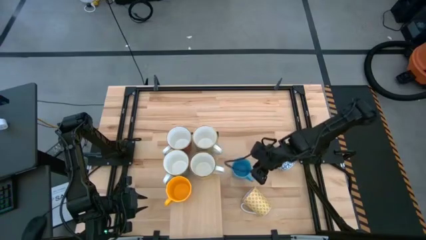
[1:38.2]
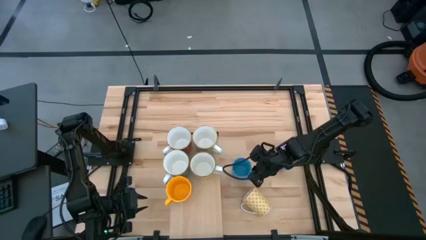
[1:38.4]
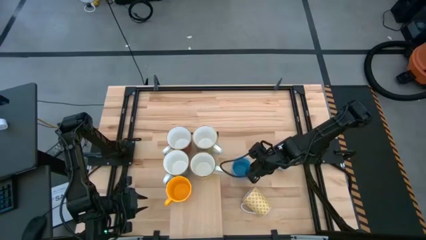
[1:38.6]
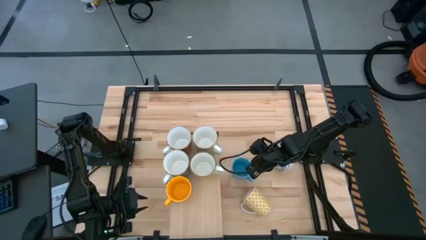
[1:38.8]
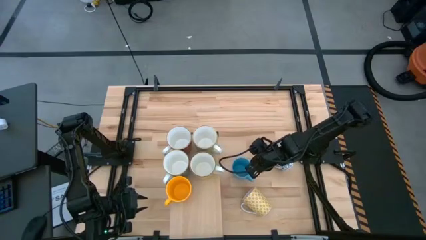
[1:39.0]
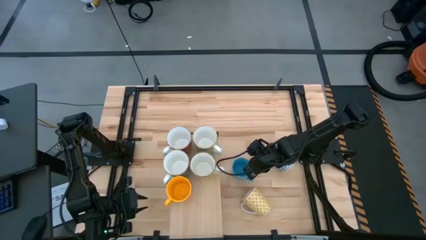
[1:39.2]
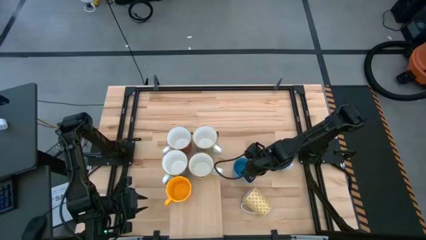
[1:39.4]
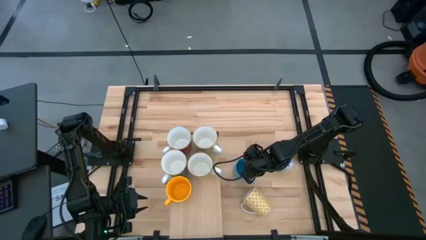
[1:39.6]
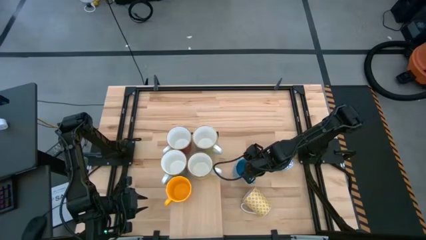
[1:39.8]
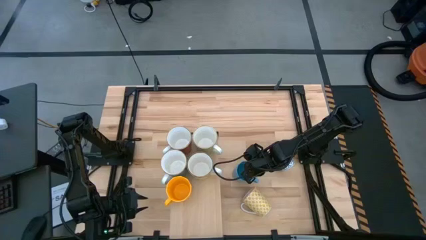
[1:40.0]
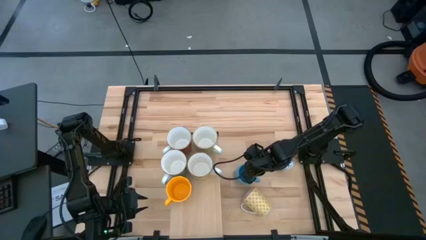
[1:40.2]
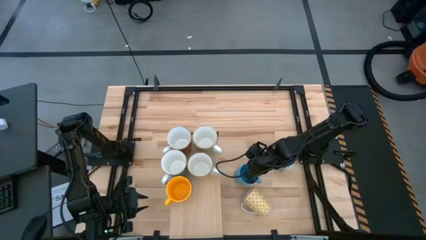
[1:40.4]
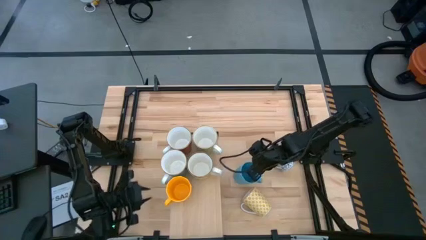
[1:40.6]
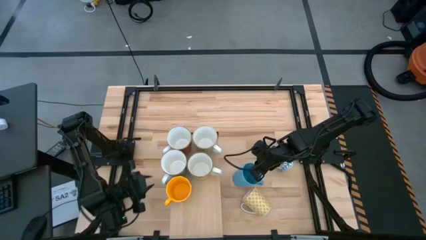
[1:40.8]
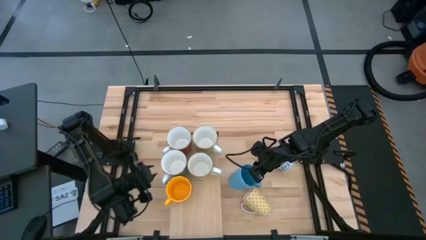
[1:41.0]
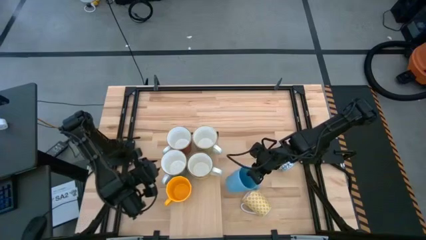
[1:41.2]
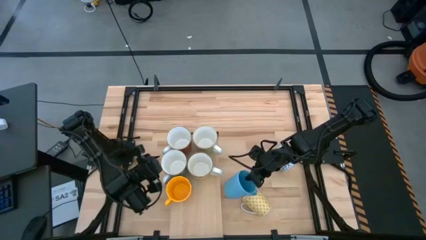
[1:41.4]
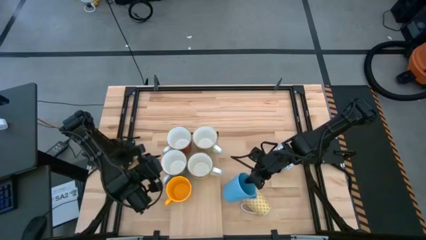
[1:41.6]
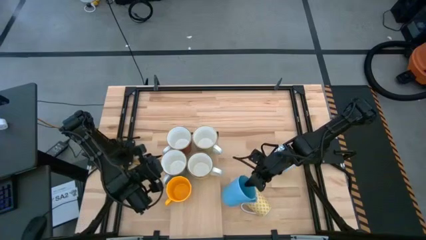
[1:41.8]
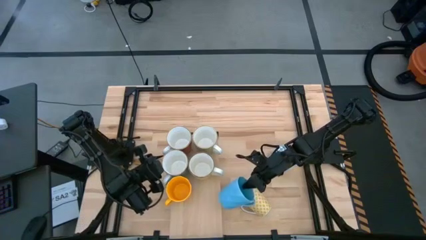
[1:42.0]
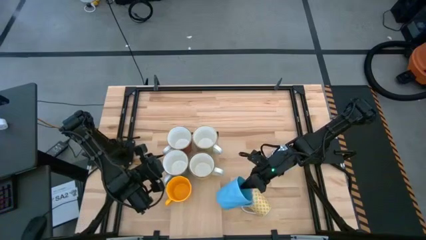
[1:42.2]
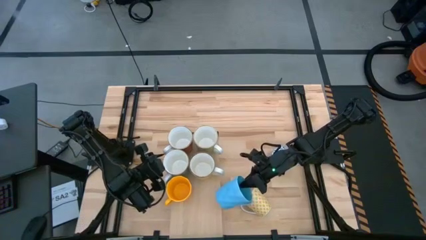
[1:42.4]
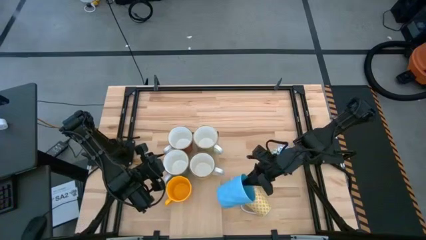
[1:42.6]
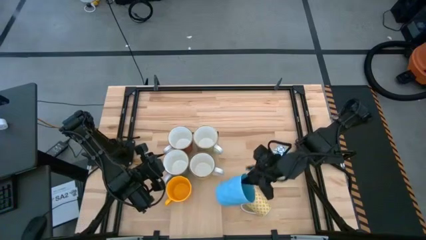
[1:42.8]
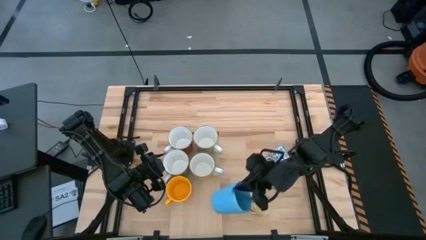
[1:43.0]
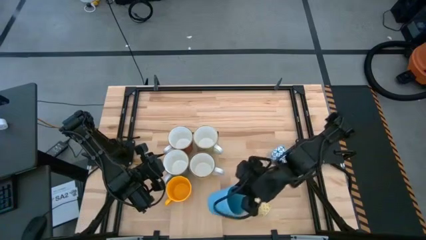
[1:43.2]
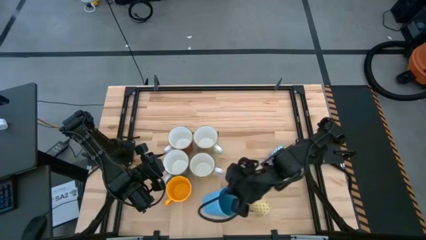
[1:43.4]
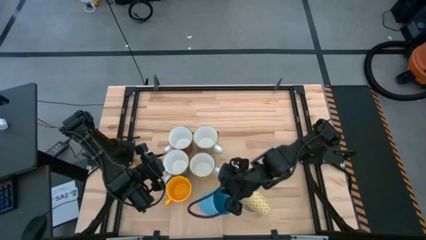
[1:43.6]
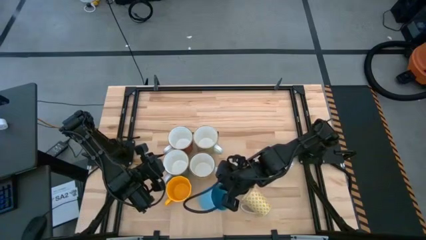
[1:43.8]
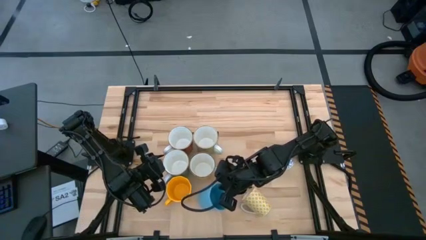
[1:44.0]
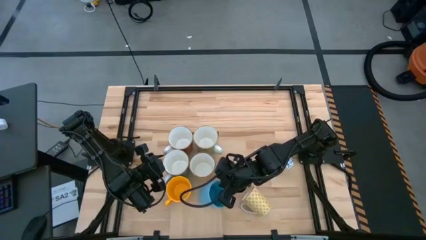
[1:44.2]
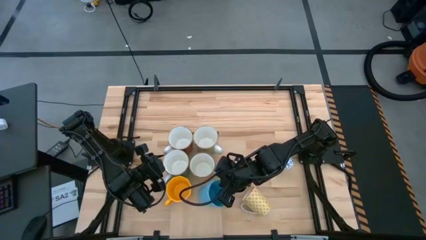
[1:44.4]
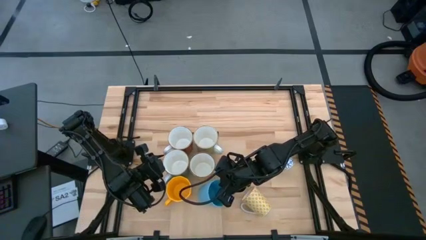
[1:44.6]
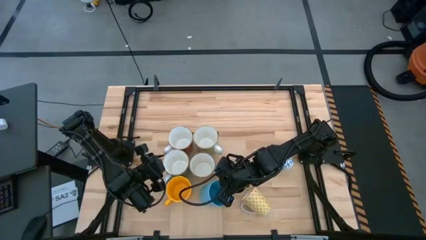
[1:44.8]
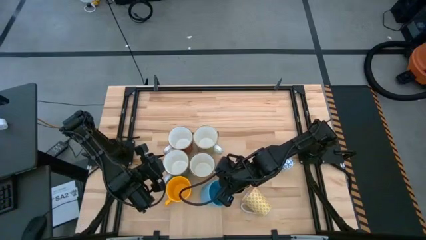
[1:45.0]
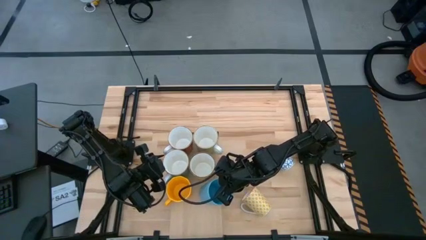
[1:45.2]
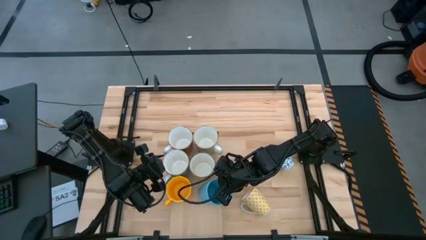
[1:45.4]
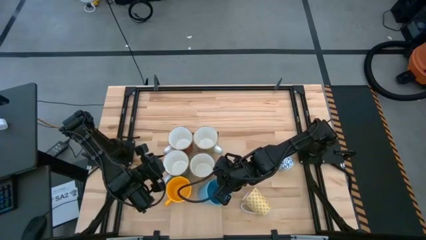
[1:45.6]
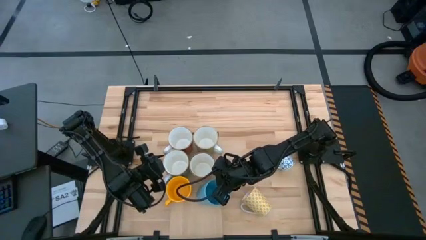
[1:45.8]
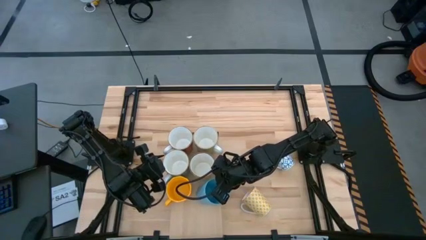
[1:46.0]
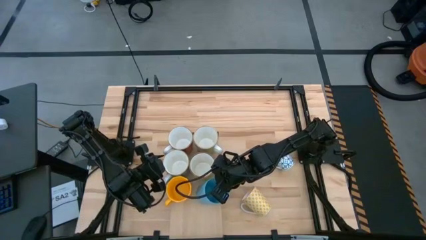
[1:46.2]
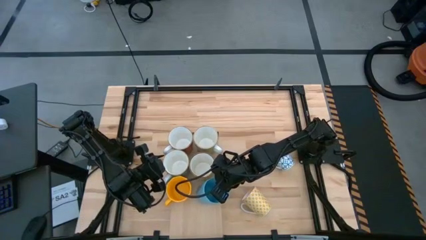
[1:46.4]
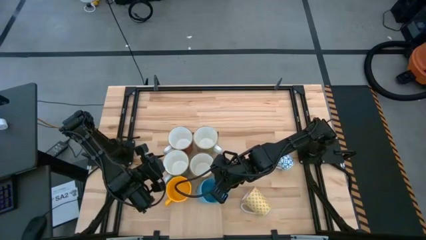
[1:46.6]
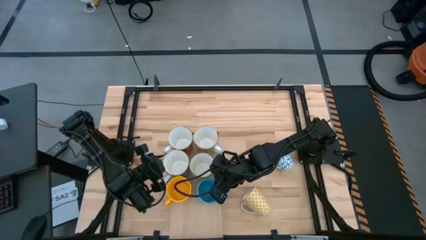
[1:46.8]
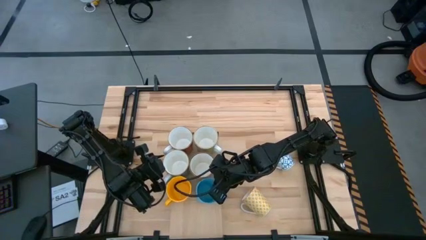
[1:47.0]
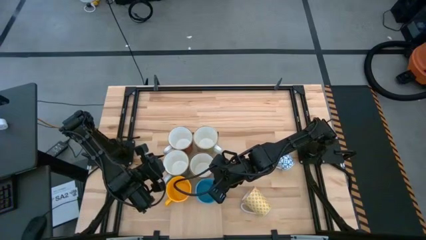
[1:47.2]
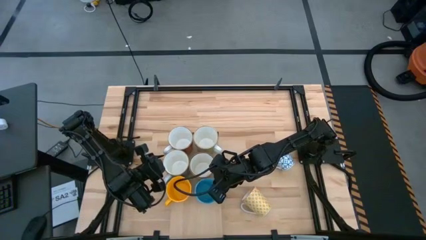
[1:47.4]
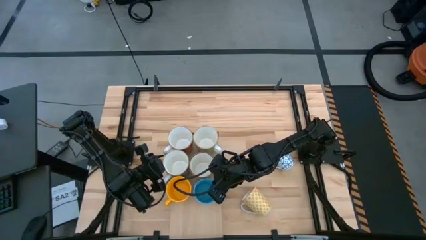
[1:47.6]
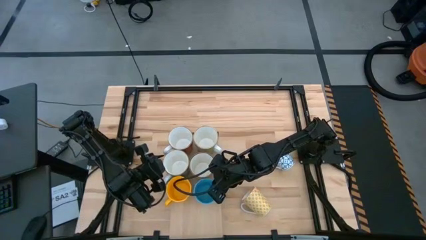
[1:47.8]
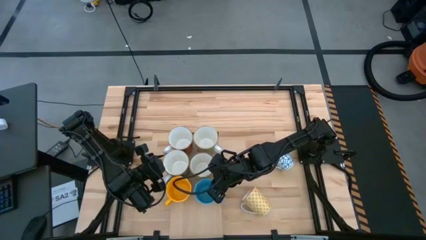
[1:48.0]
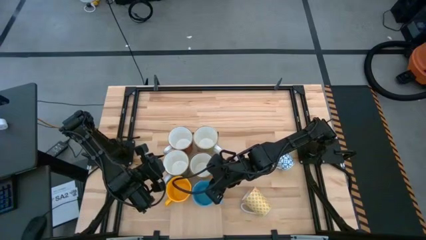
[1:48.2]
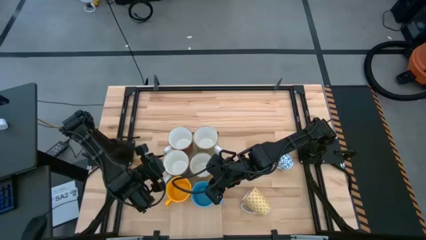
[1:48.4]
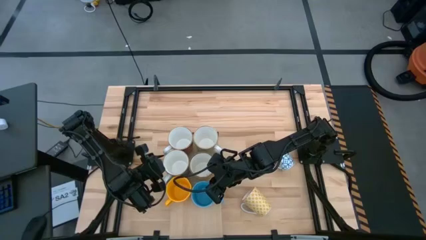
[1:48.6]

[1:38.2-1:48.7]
Task: Place coffee mugs
Put the left blue mug on the shelf aligned with the yellow mug

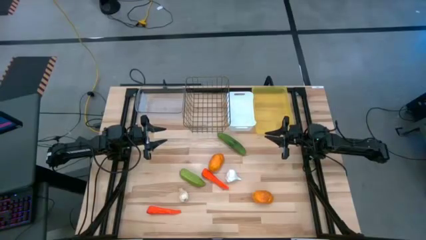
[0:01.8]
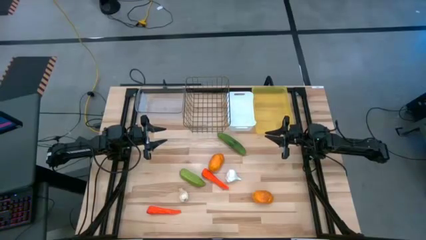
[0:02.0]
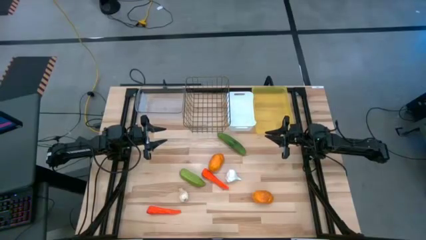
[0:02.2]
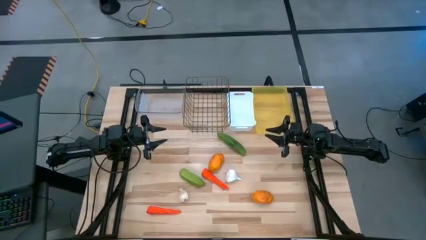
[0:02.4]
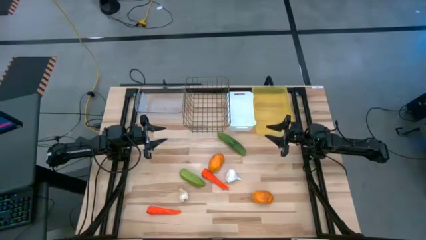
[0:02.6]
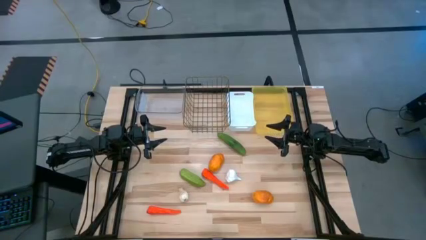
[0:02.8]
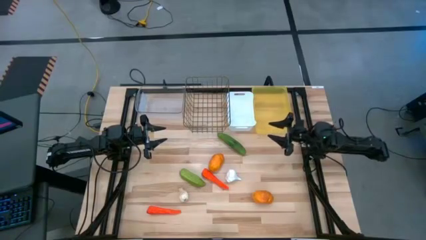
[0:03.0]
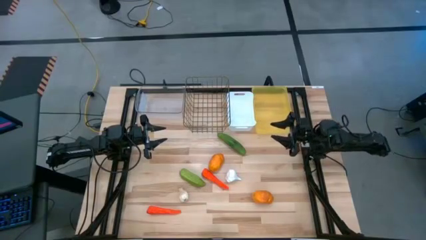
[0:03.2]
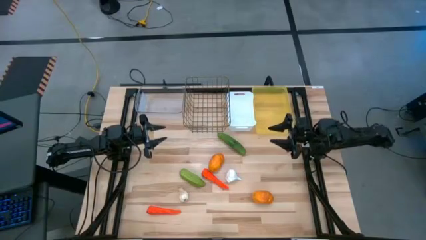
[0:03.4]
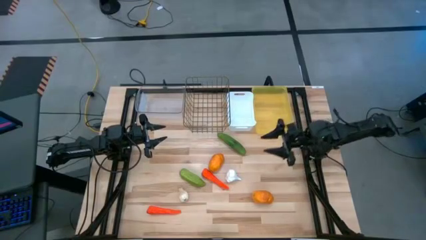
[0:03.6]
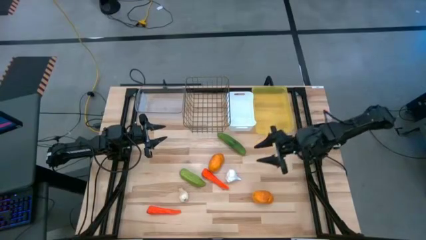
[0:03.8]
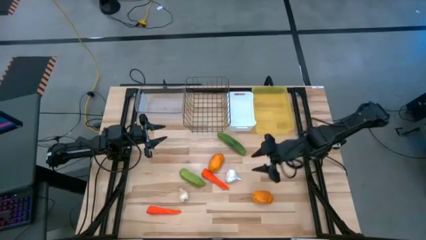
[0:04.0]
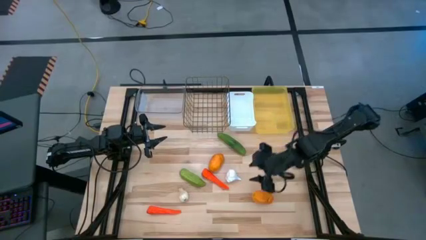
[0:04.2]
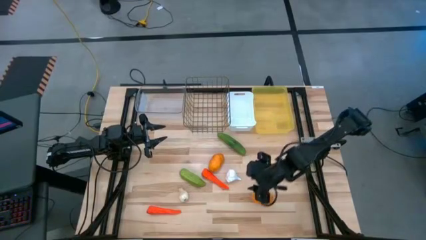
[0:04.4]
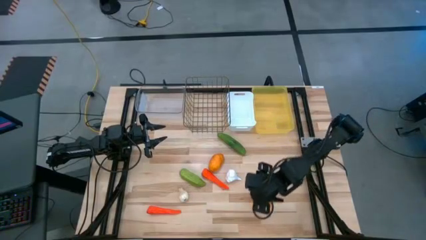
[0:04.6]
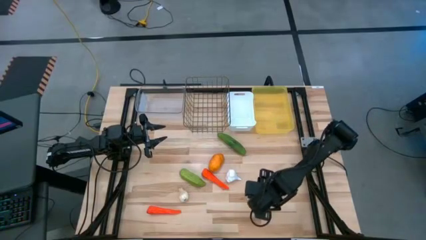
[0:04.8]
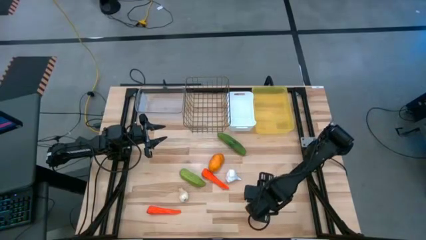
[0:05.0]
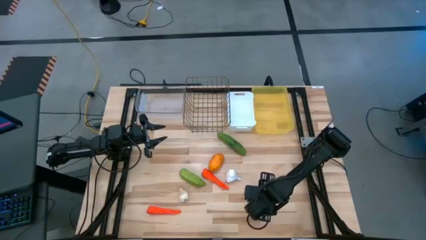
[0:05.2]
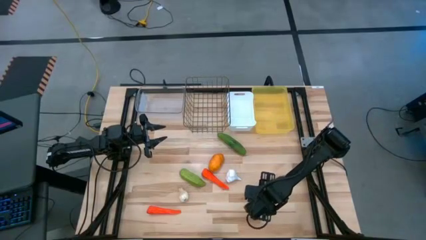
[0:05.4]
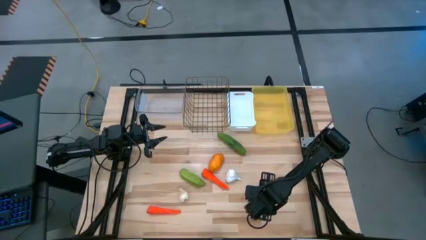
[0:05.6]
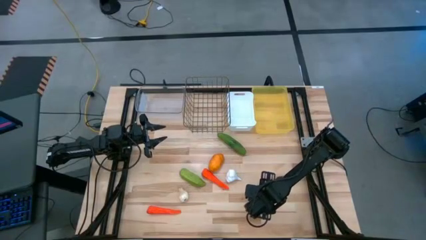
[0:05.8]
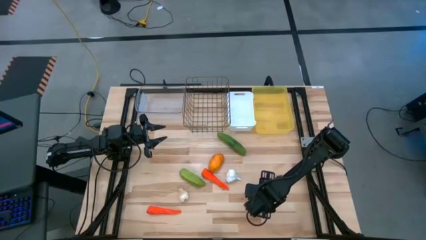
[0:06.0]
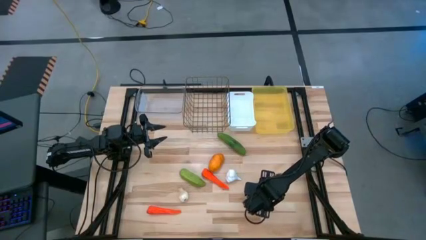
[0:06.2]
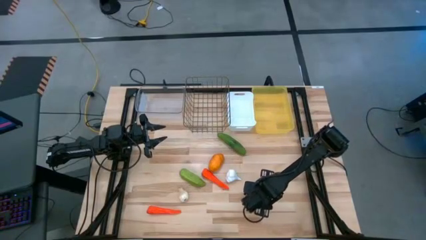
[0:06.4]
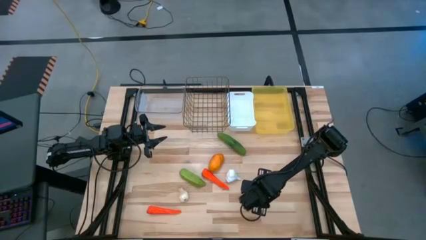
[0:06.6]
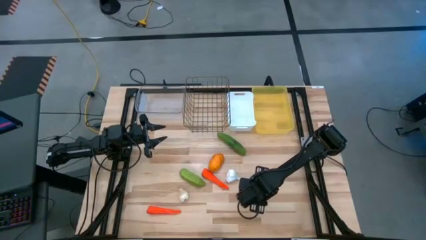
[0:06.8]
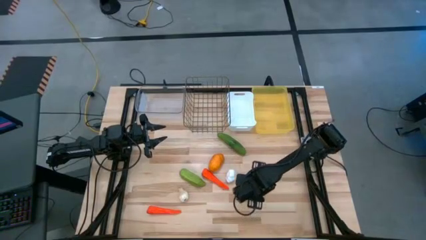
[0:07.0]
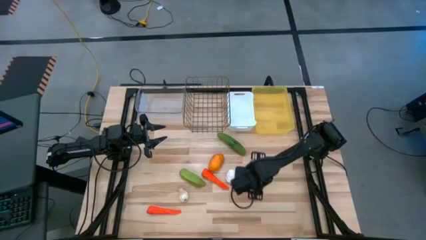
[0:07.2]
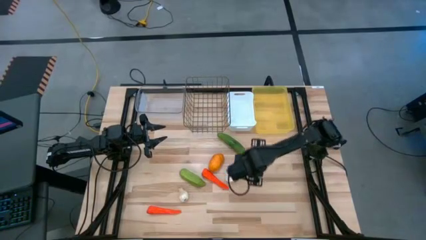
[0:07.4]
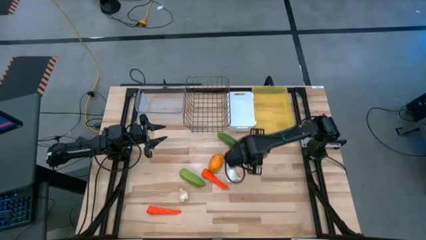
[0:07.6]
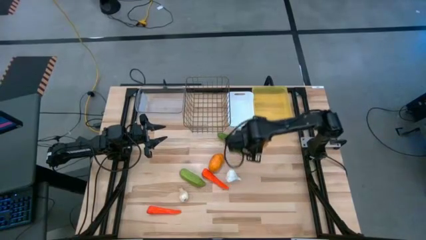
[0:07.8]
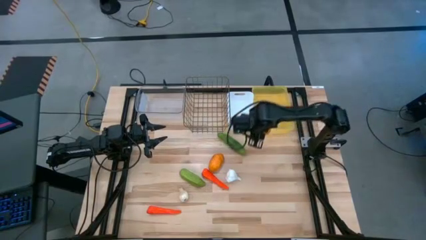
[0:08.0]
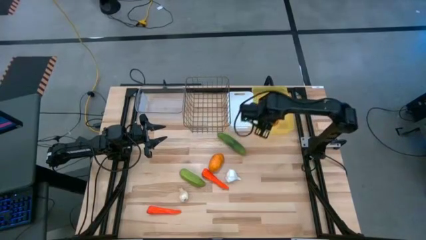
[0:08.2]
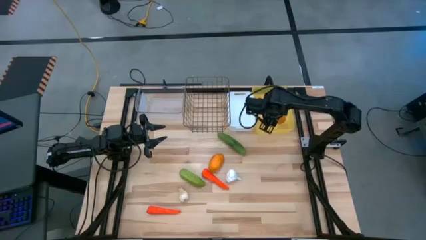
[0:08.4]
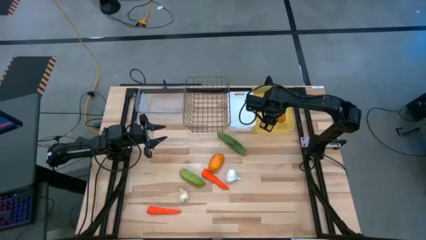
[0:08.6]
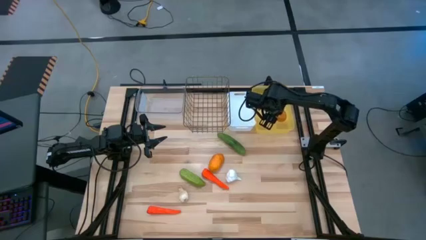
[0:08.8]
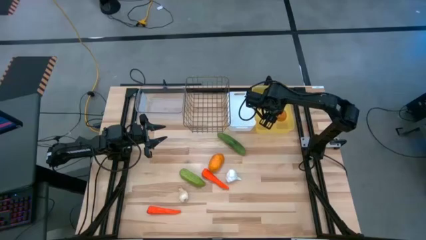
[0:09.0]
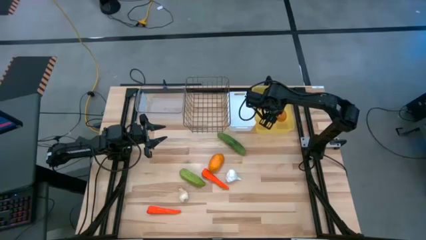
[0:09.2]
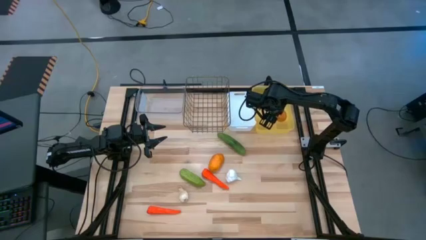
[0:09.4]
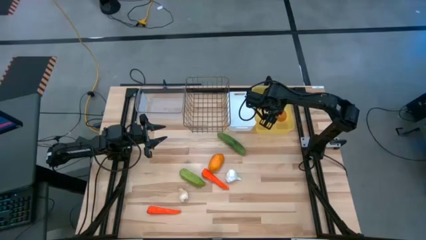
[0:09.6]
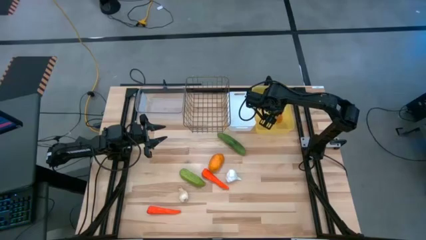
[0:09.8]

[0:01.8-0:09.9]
Task: Sort produce into baskets
Put the bottom potato into the yellow bin
